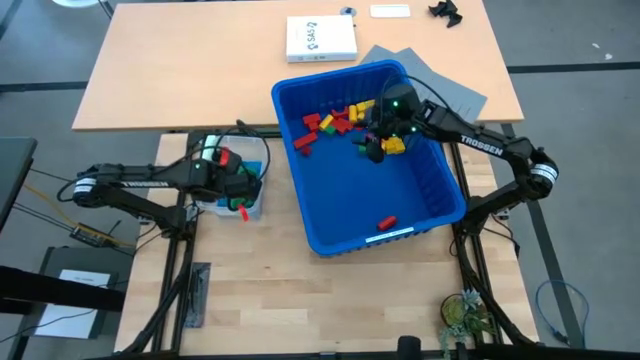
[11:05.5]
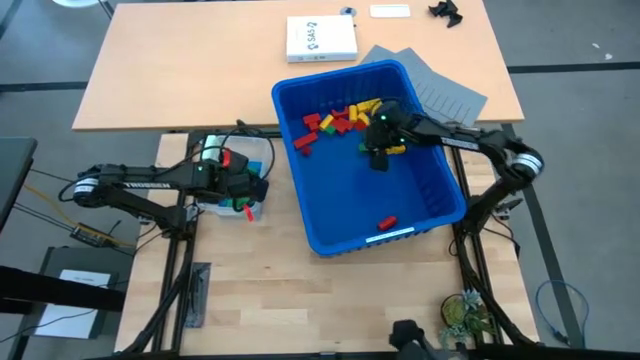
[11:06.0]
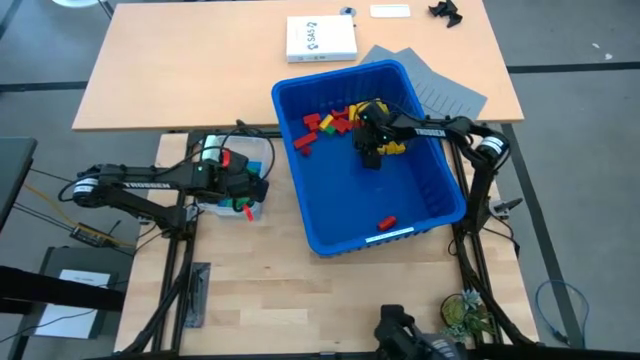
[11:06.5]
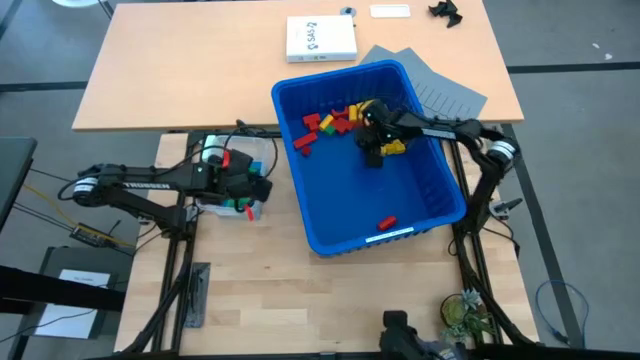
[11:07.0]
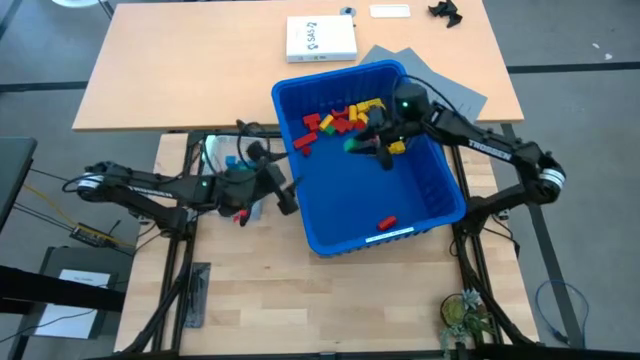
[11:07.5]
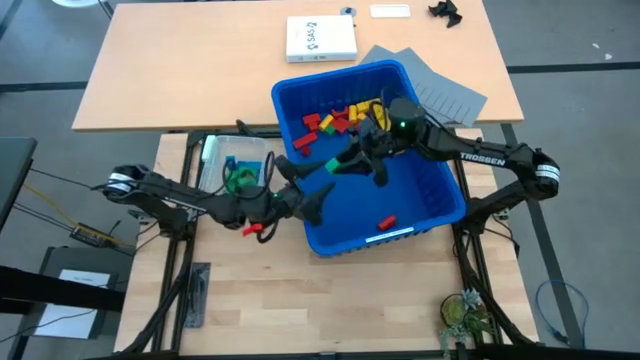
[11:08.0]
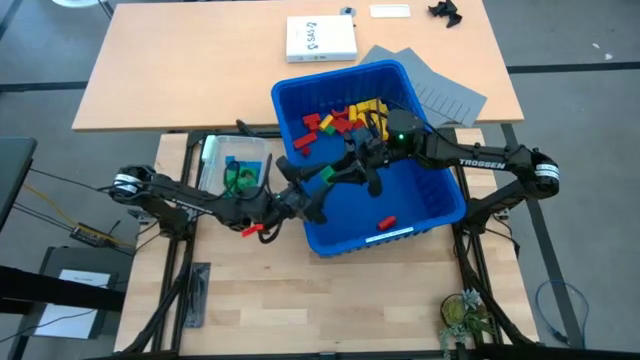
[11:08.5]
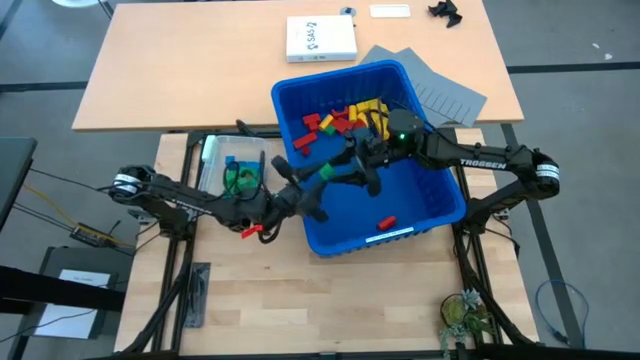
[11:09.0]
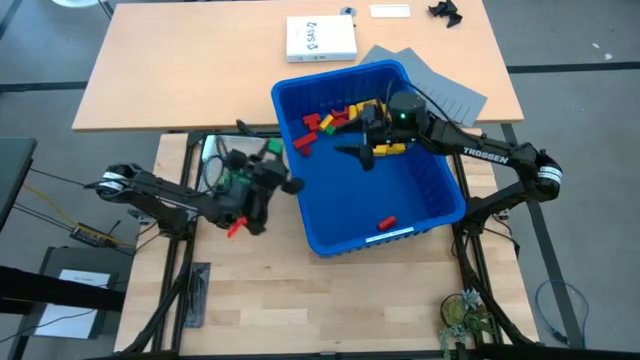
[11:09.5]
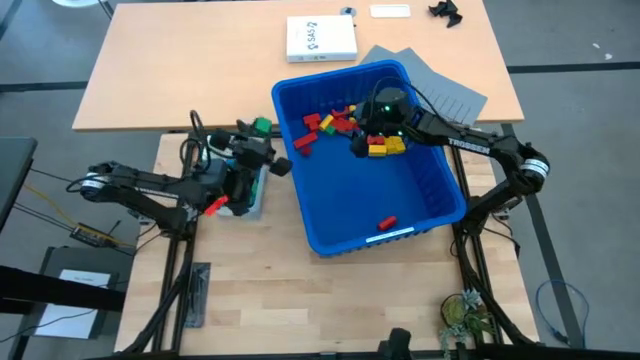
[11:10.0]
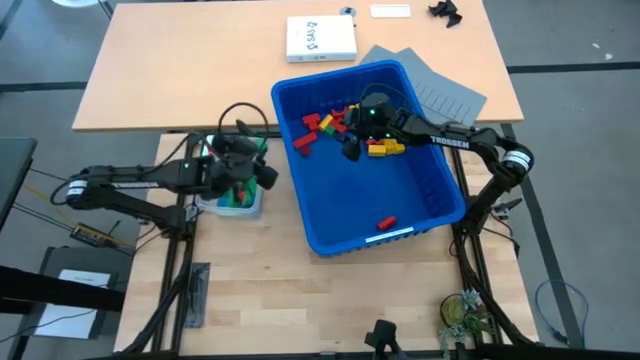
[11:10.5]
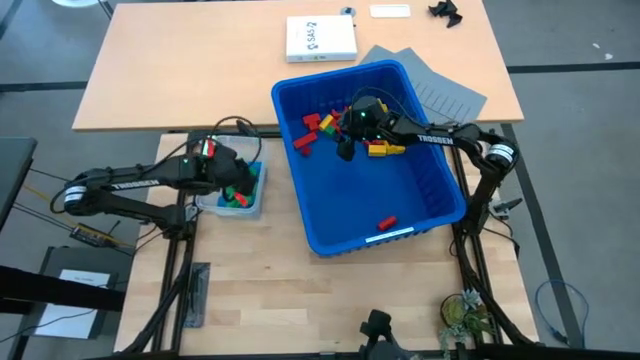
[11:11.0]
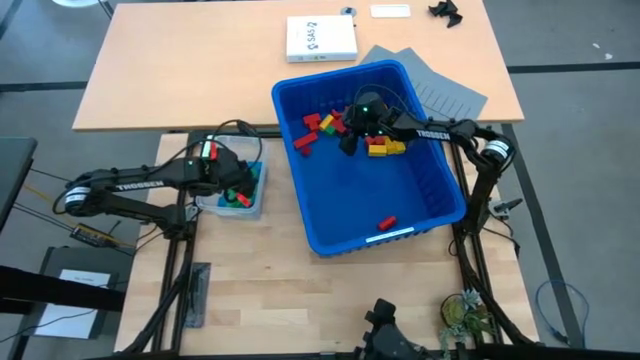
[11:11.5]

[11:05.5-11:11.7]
Task: Sort blocks
Put the green block into the transparent bin

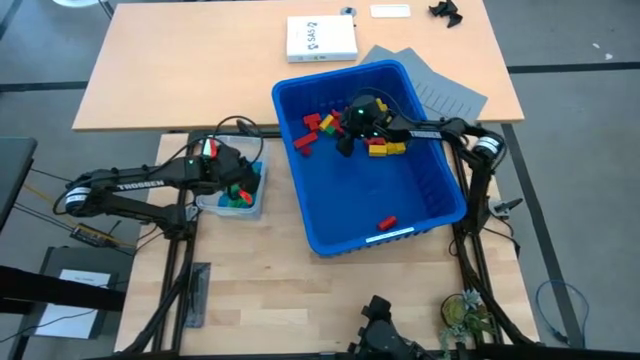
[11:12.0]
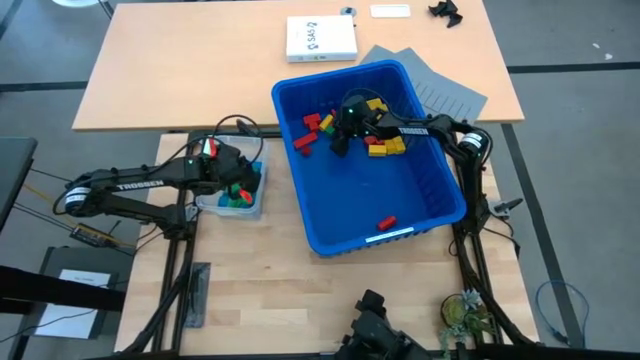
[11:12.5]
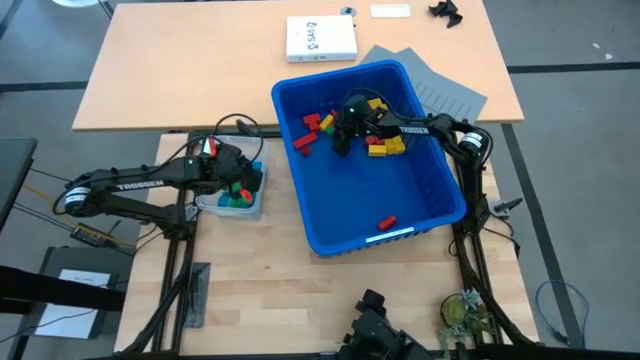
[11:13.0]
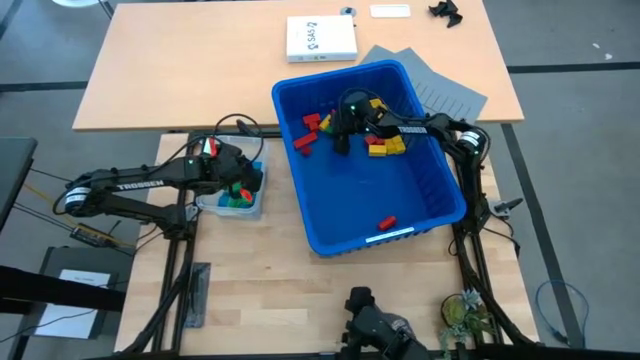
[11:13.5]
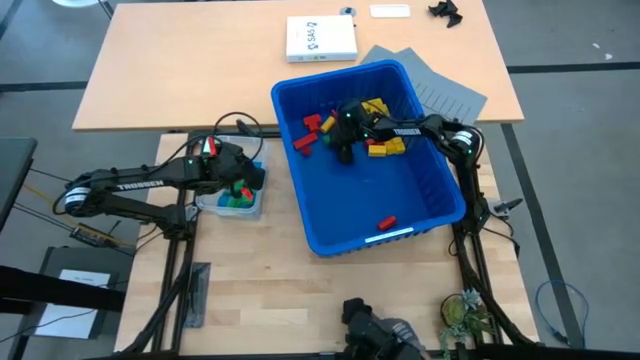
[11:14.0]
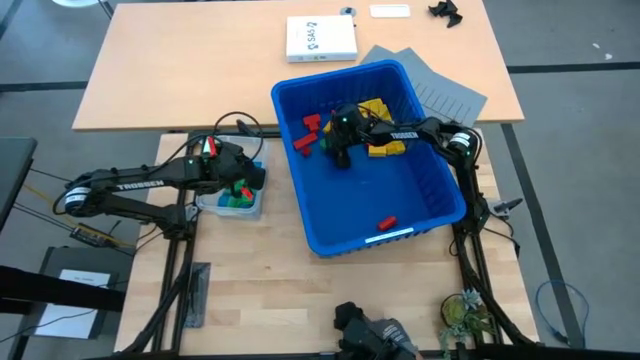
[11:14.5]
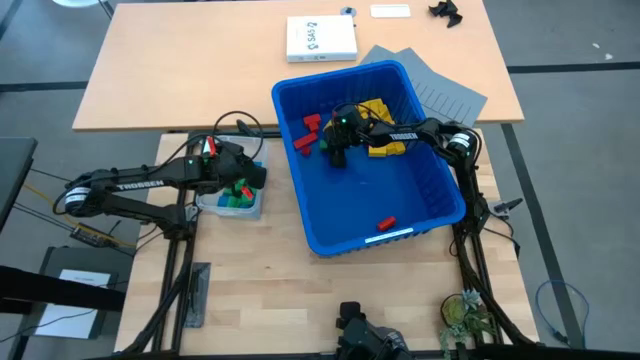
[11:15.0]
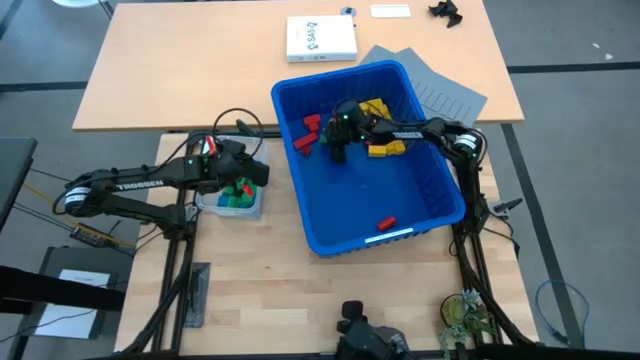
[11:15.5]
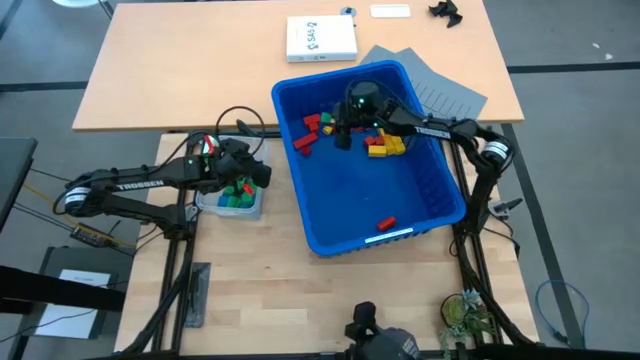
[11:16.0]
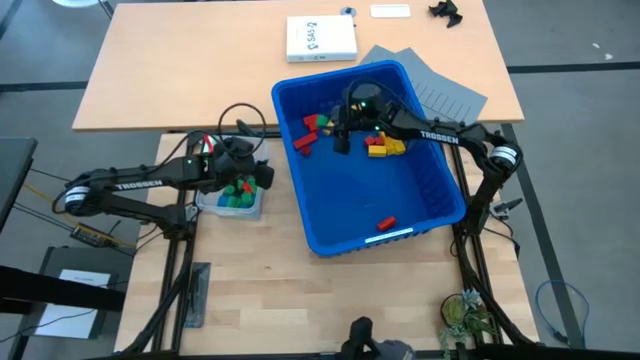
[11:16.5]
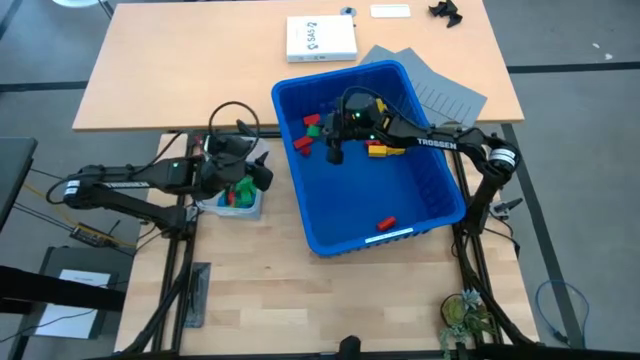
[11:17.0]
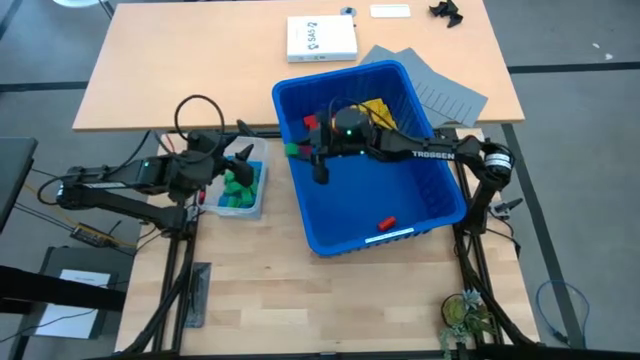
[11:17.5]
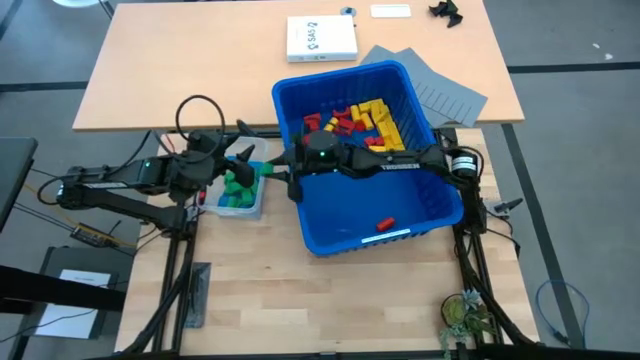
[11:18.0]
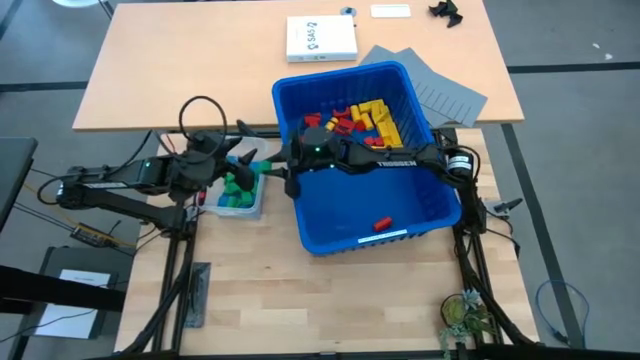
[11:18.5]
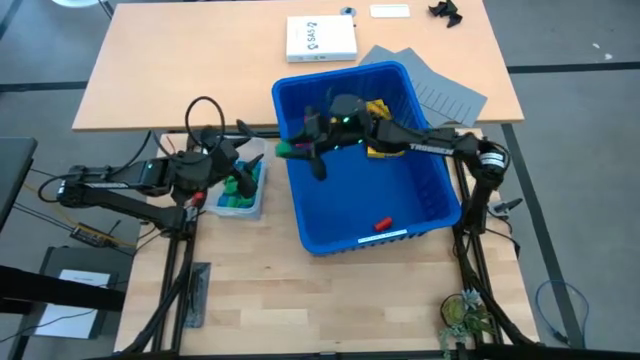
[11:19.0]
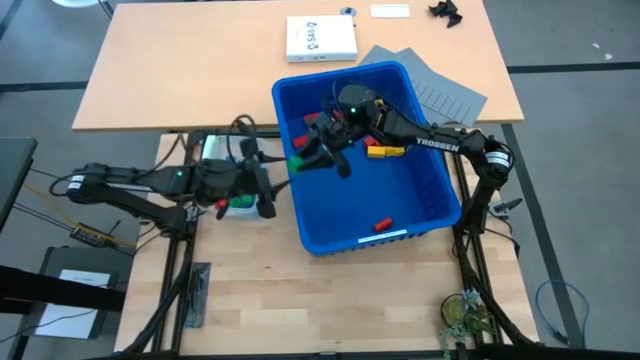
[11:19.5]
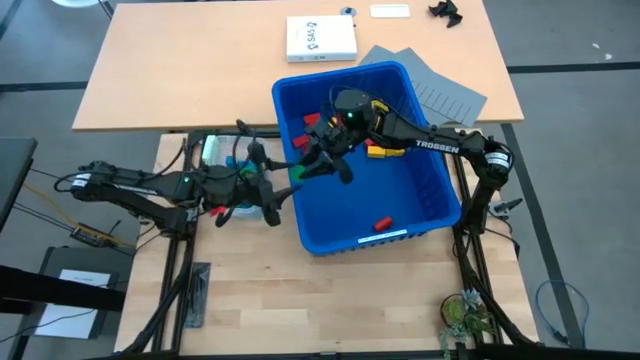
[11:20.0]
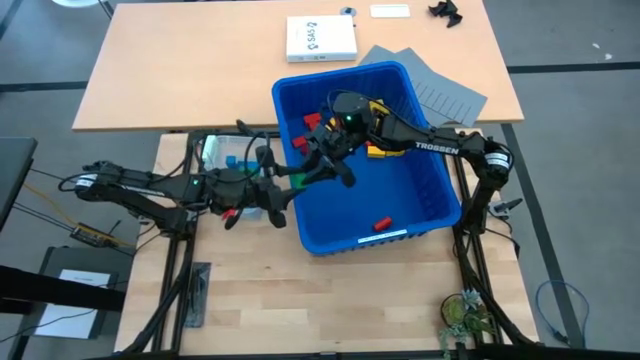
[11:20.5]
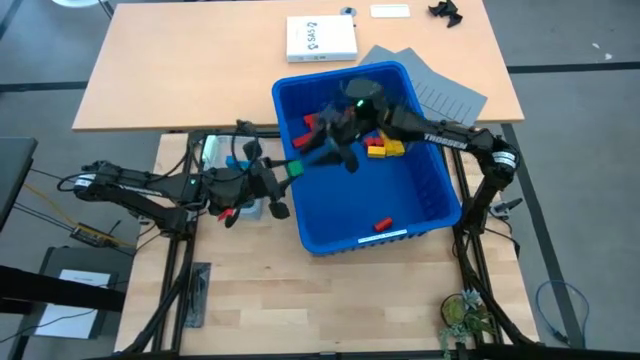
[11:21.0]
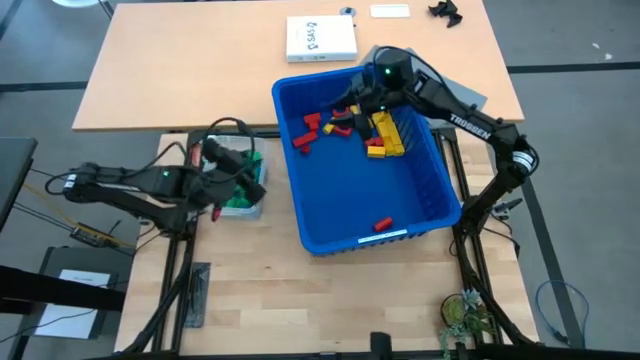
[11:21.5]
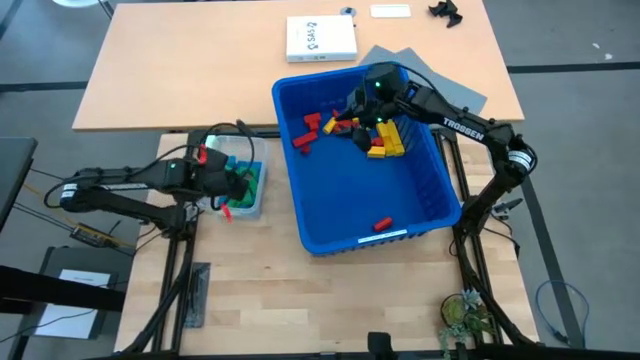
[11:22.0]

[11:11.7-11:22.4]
Put the green block into the transparent bin

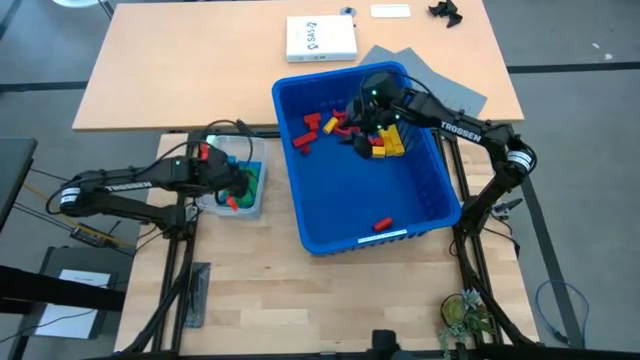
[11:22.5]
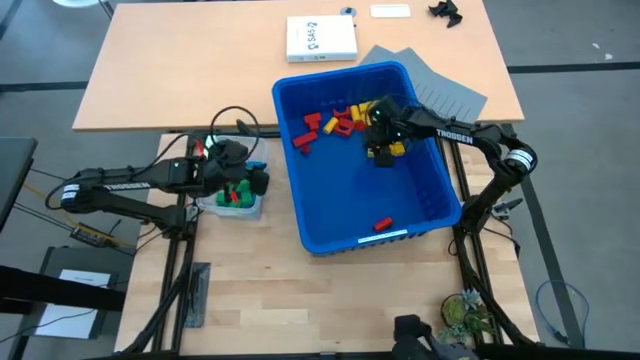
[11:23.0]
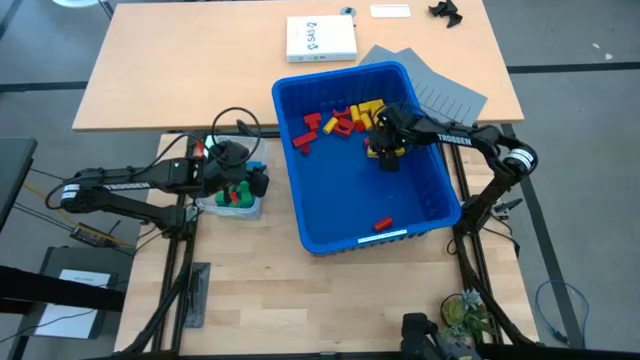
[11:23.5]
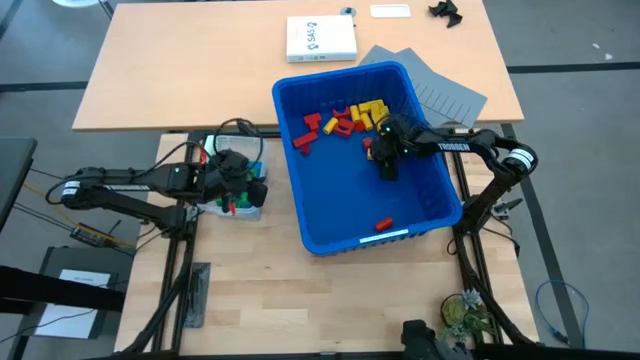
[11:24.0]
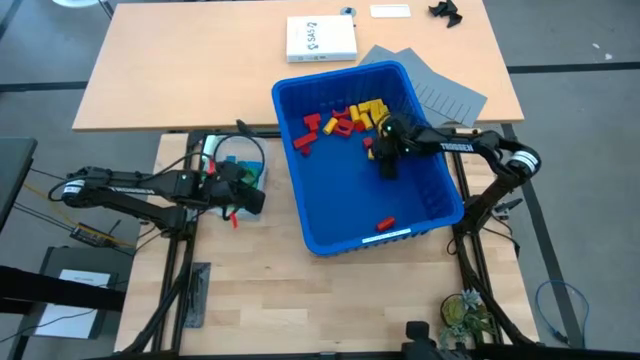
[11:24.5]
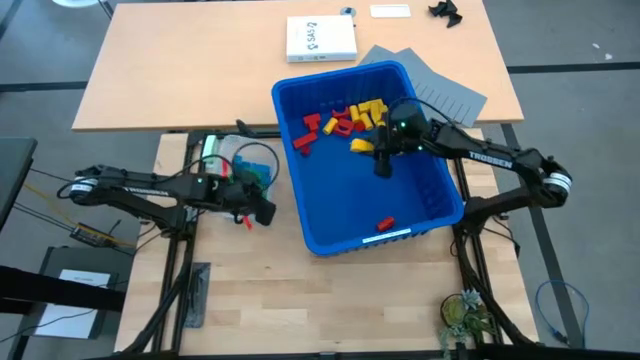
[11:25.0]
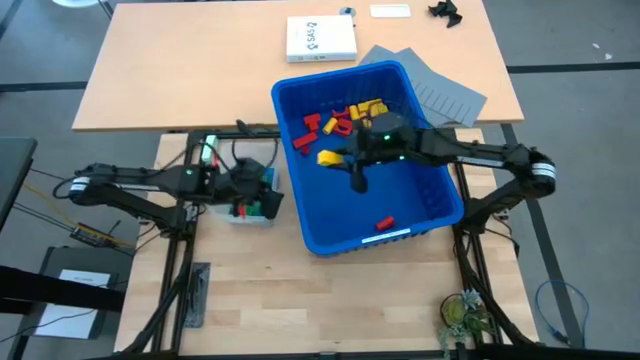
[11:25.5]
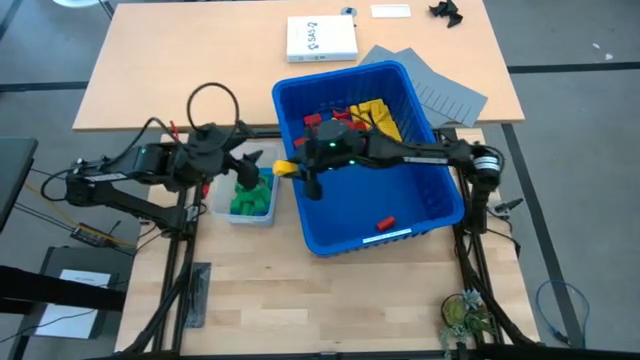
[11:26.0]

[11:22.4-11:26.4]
Put the yellow block into the transparent bin
